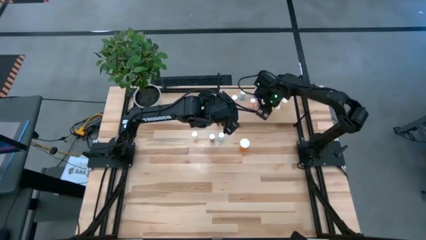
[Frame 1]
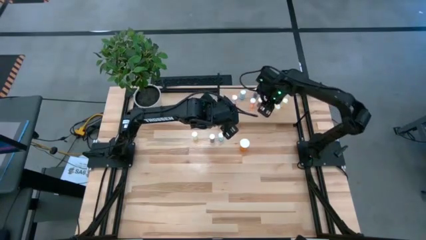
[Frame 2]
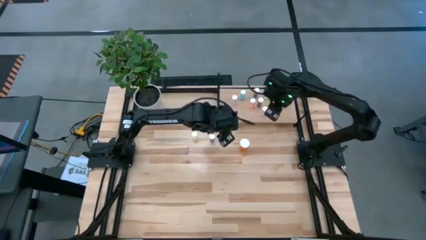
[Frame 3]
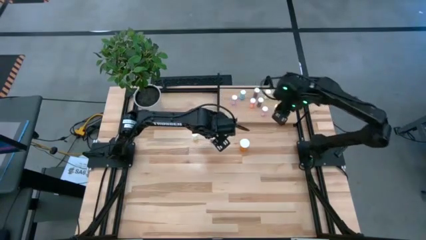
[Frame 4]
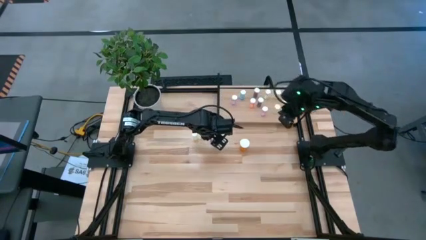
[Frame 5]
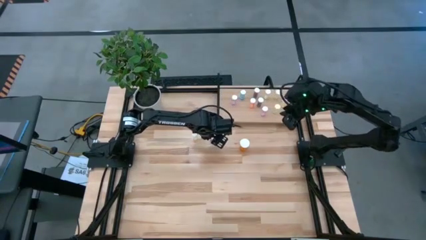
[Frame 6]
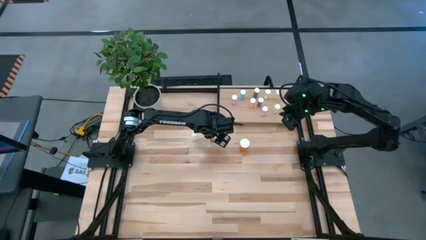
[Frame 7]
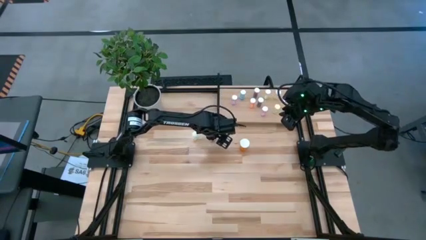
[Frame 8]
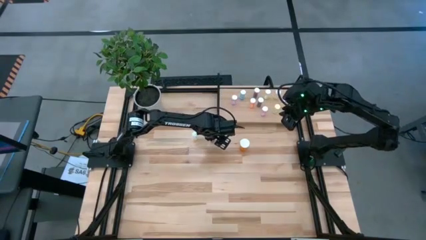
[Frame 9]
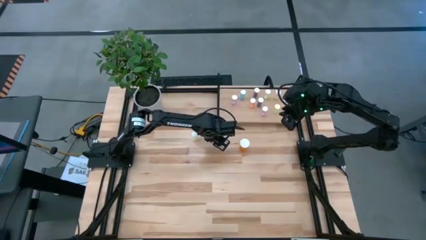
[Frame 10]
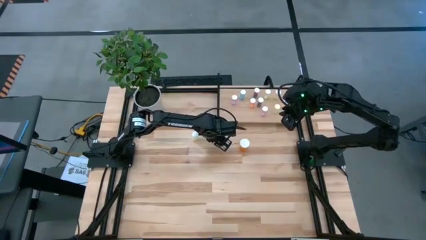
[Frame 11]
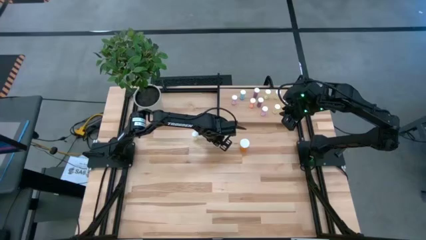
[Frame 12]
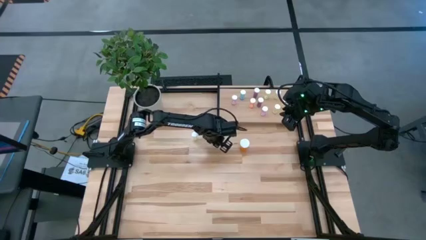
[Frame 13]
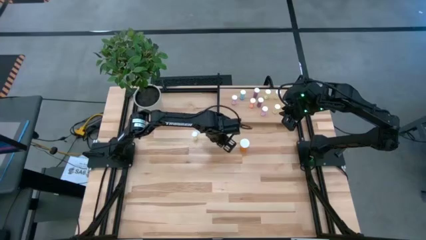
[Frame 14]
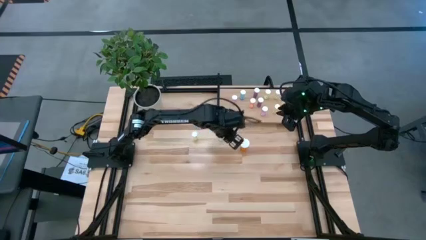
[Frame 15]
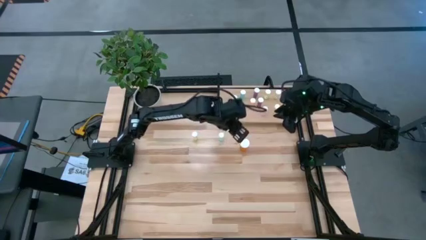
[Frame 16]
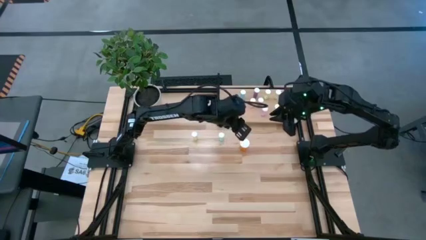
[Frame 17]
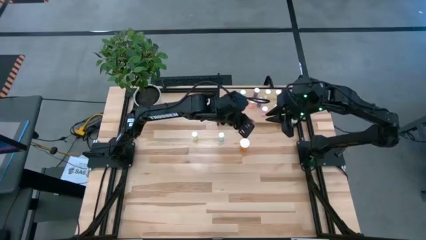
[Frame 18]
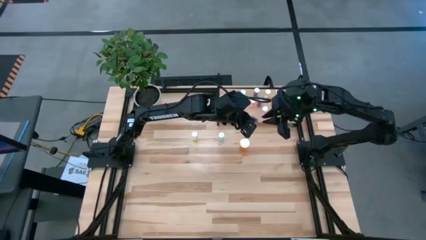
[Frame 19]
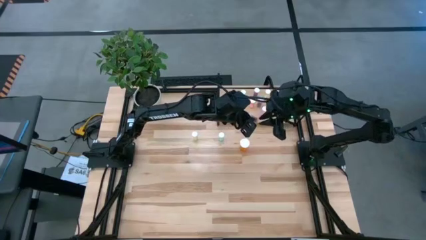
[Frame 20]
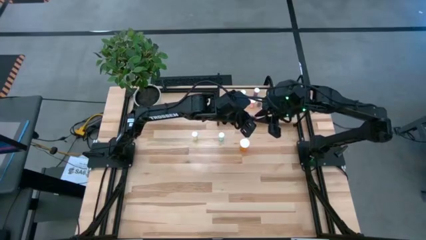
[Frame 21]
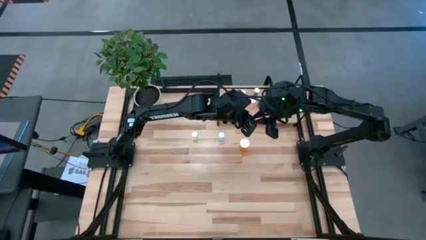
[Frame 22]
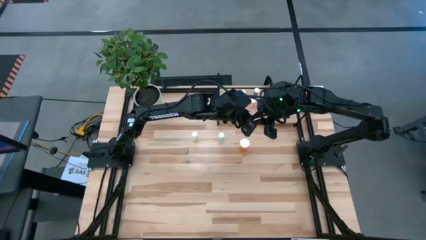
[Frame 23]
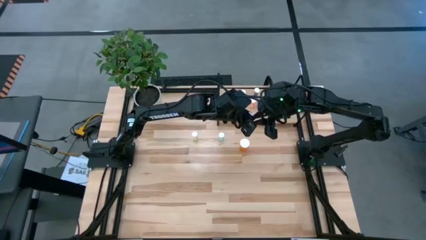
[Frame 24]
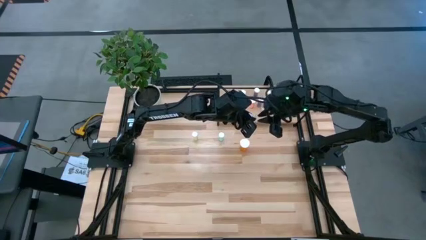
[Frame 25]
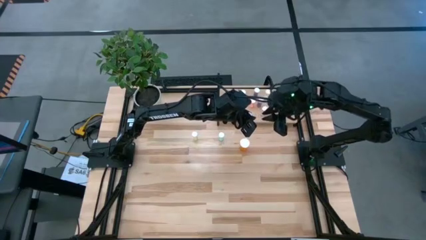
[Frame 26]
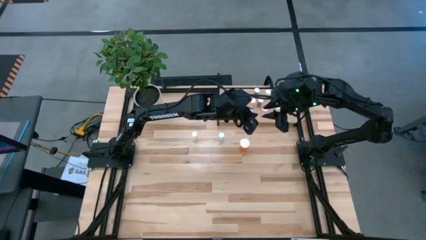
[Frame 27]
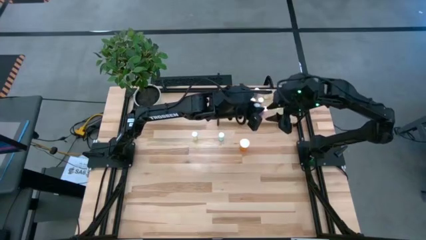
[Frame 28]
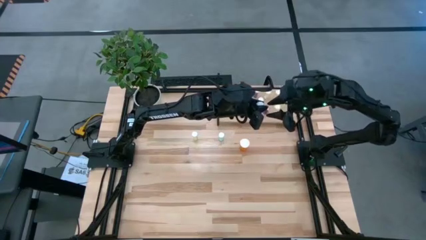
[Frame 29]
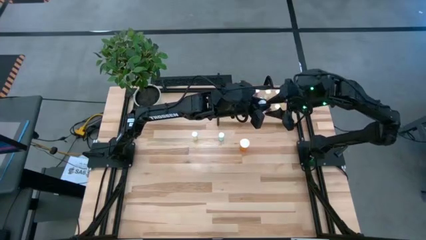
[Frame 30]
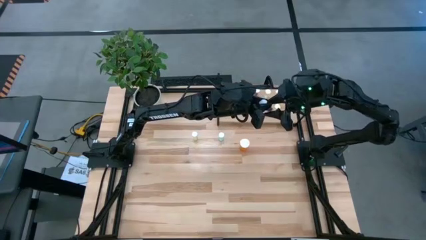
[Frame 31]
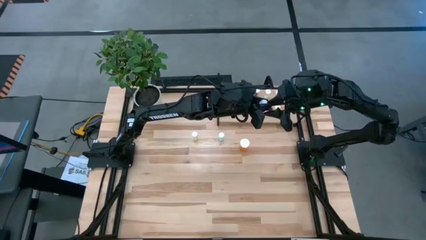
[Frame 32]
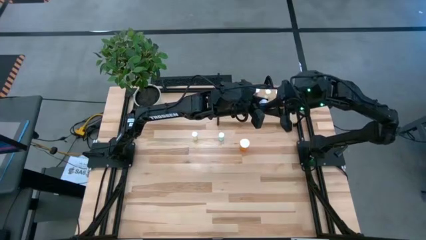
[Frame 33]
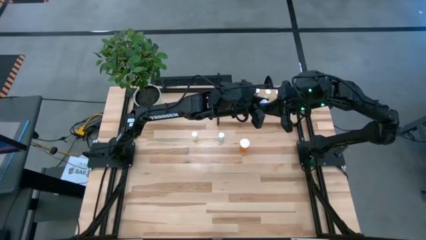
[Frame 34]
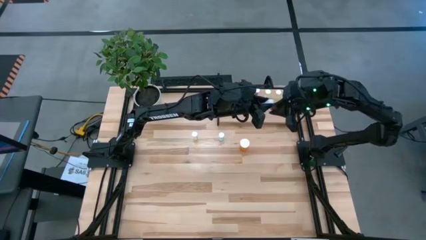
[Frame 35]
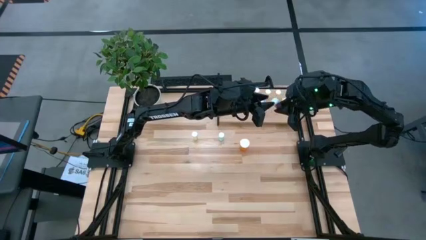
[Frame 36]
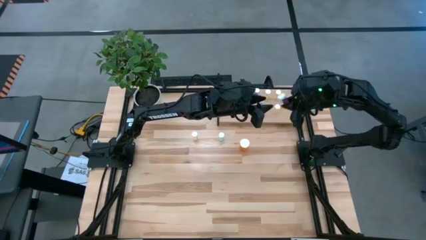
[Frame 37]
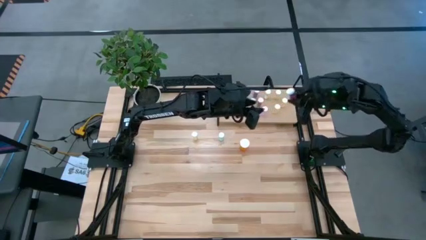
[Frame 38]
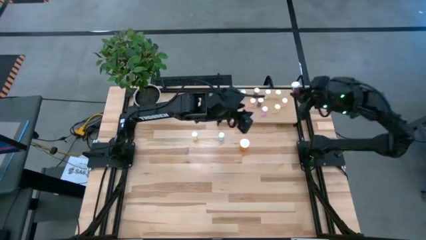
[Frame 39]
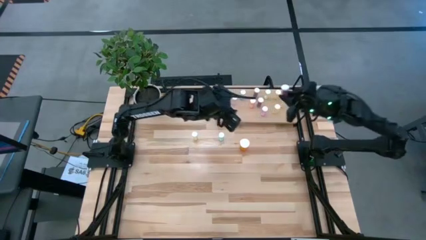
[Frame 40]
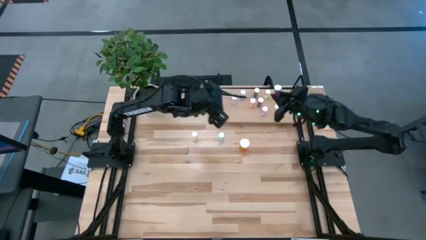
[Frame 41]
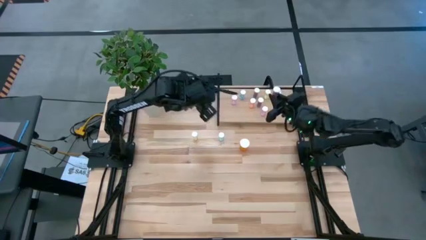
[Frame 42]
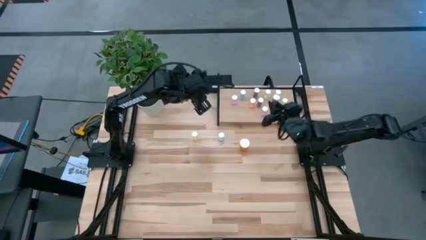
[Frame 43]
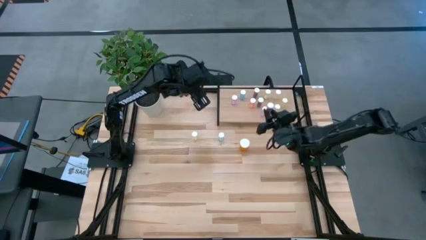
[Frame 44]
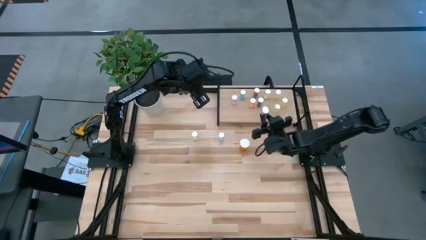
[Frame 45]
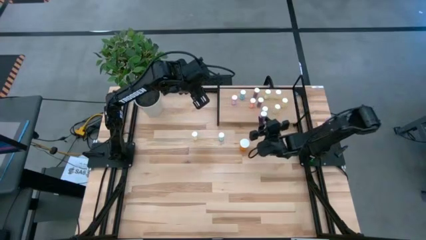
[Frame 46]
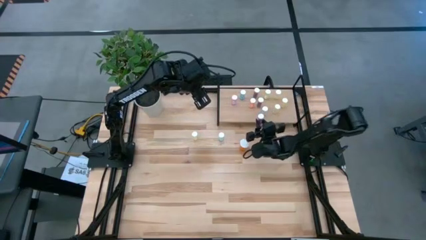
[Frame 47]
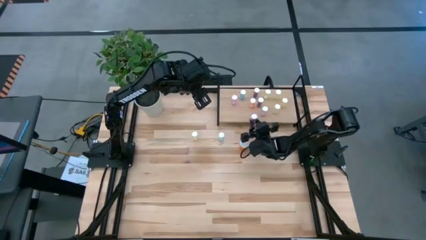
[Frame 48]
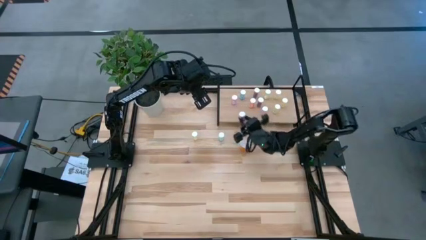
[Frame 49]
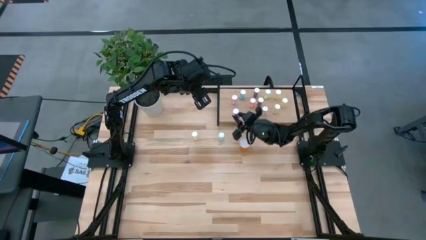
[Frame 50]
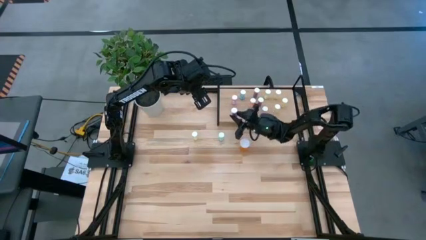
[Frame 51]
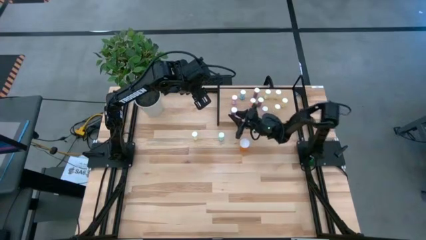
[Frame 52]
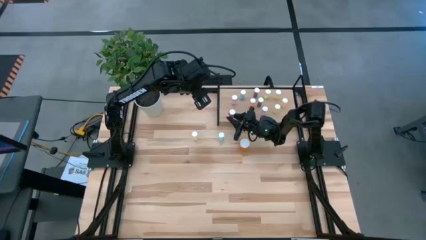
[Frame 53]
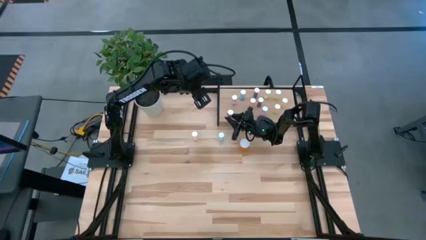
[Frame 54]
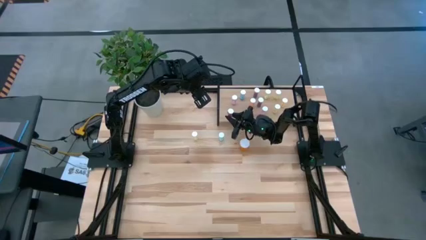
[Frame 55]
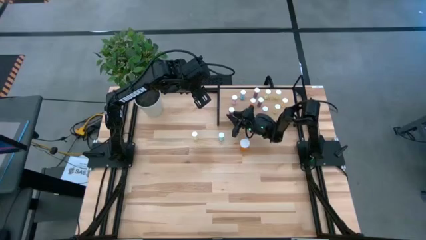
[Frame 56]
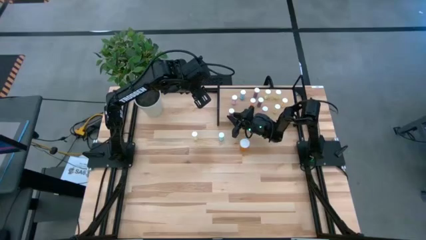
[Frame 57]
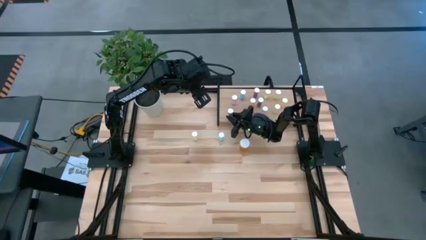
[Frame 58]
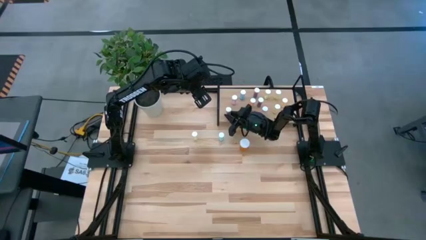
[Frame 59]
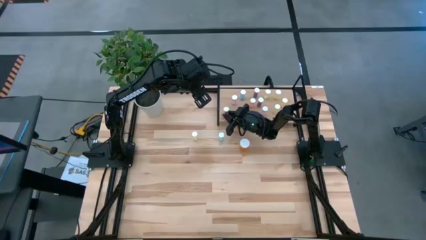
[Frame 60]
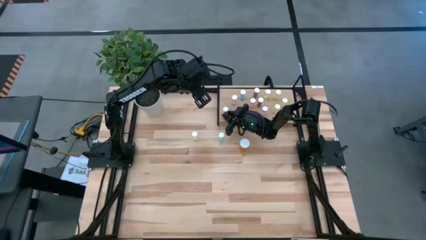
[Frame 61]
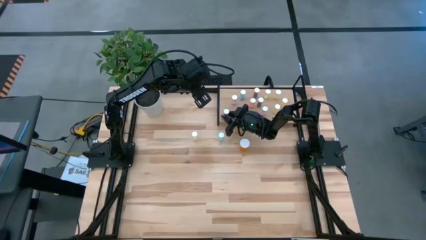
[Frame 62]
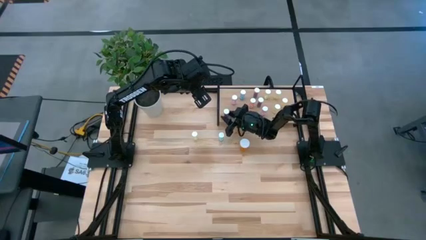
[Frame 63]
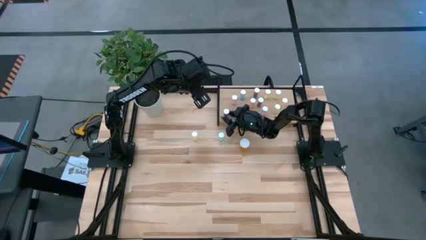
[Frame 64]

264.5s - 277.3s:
Task: Pick and place medicine bottles onto shelf by color
Put the blue pill bottle on the shelf
